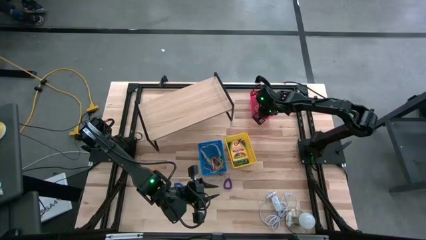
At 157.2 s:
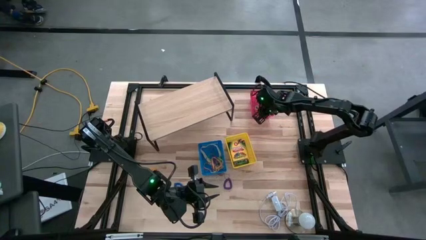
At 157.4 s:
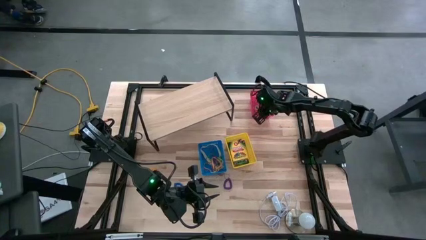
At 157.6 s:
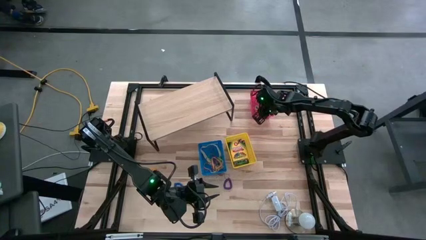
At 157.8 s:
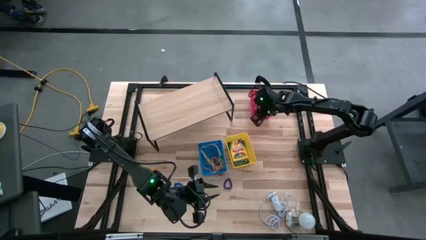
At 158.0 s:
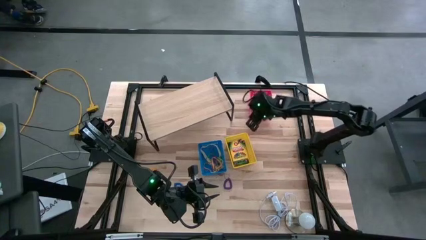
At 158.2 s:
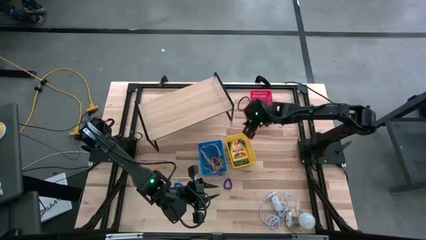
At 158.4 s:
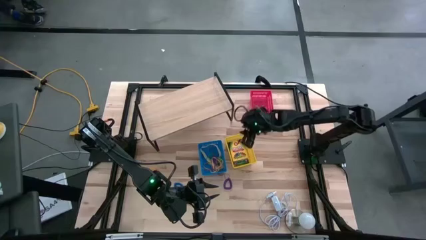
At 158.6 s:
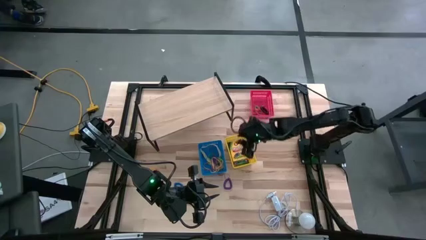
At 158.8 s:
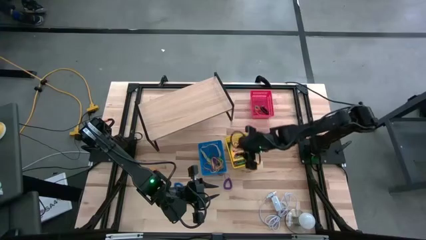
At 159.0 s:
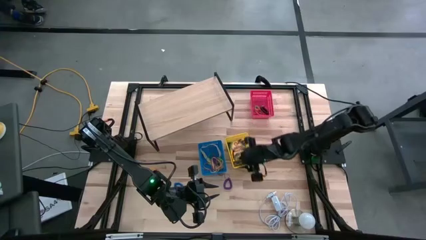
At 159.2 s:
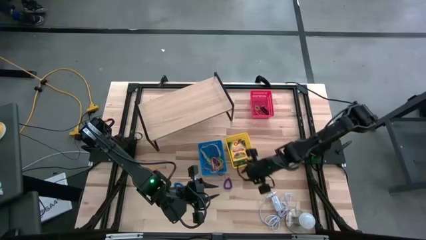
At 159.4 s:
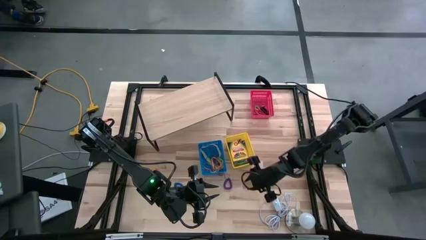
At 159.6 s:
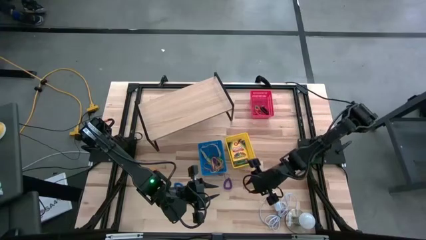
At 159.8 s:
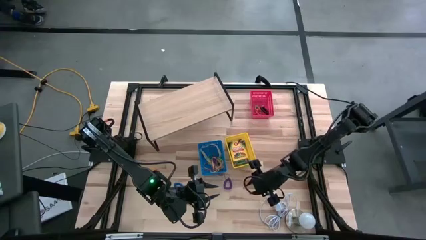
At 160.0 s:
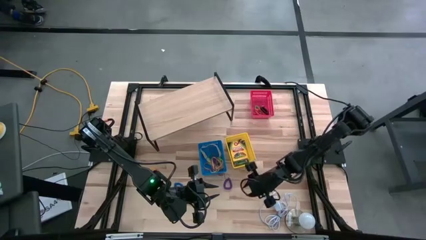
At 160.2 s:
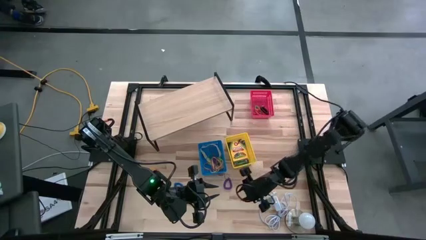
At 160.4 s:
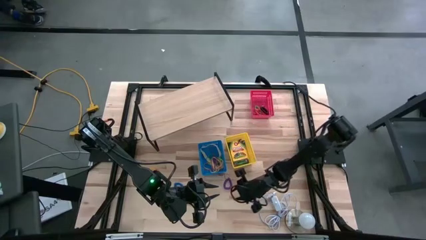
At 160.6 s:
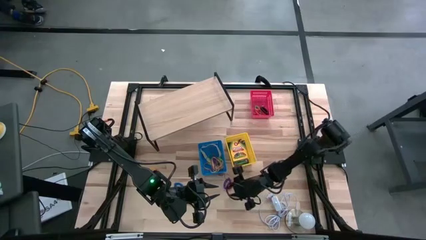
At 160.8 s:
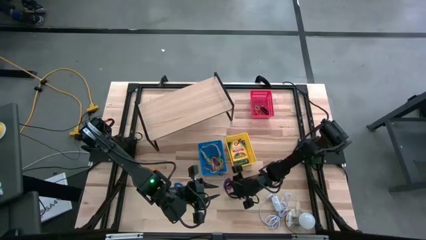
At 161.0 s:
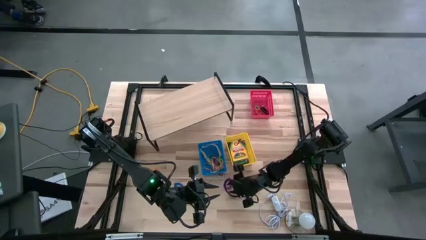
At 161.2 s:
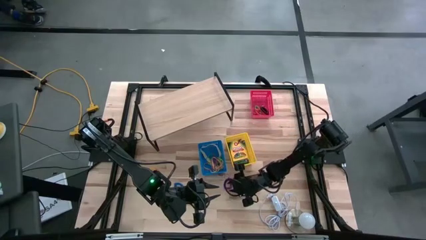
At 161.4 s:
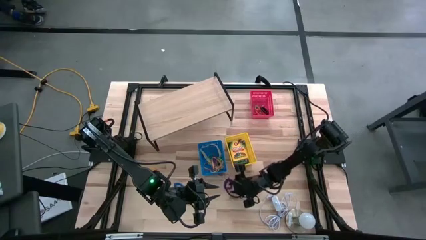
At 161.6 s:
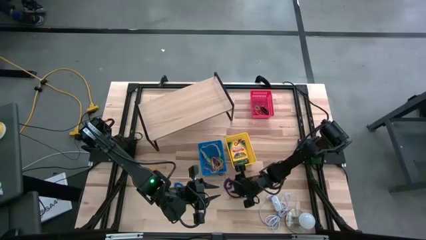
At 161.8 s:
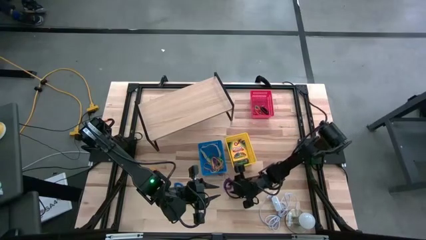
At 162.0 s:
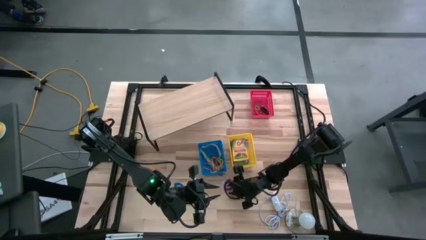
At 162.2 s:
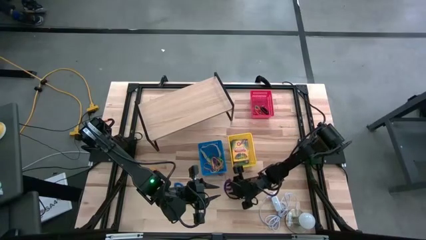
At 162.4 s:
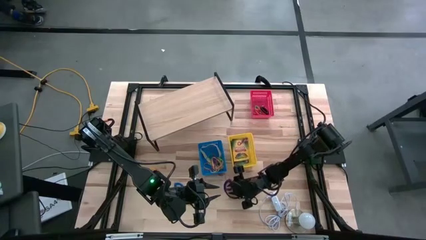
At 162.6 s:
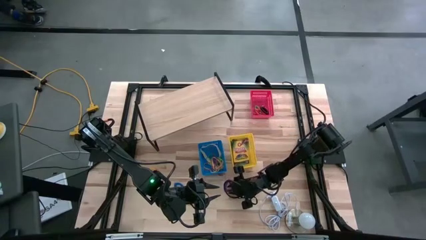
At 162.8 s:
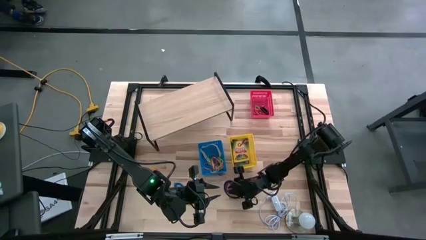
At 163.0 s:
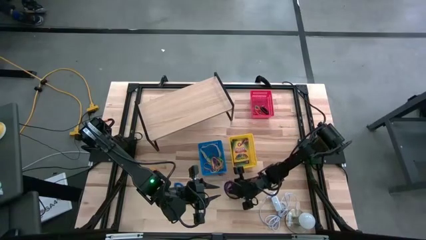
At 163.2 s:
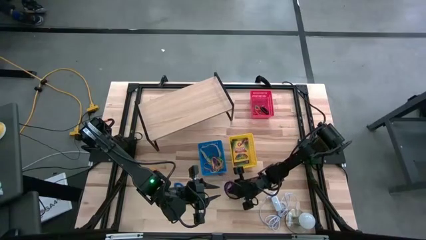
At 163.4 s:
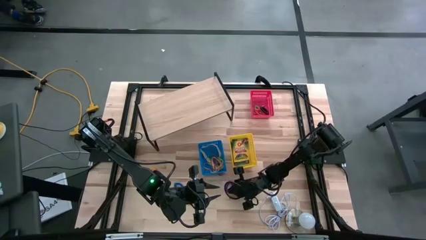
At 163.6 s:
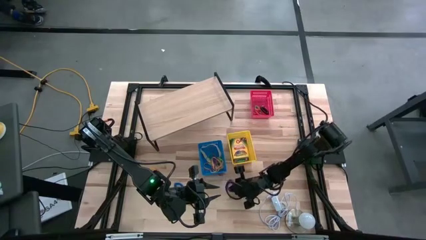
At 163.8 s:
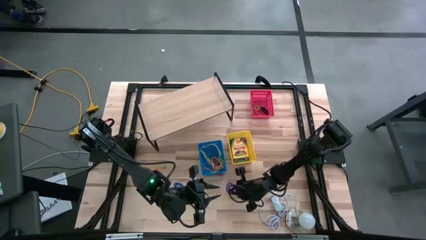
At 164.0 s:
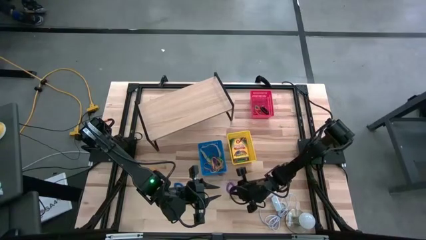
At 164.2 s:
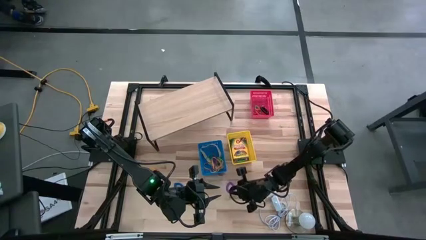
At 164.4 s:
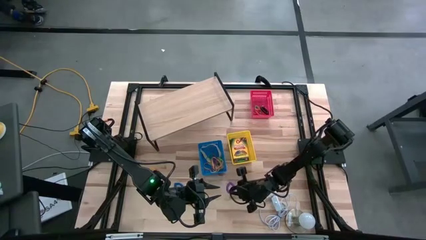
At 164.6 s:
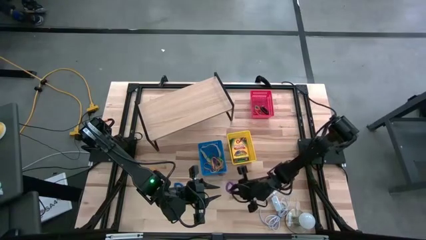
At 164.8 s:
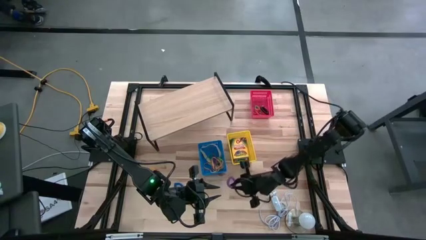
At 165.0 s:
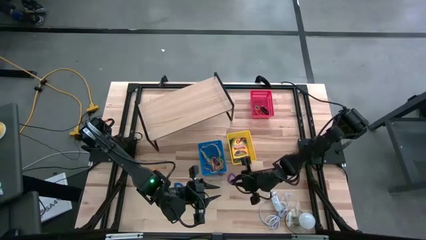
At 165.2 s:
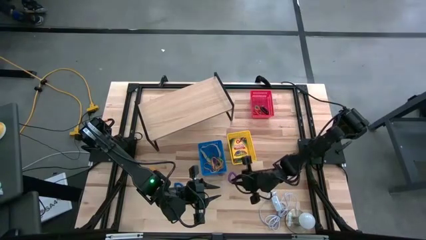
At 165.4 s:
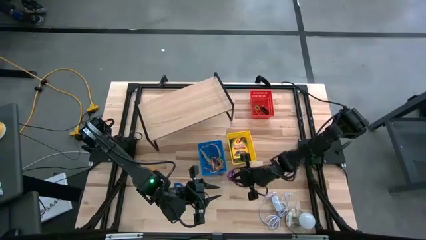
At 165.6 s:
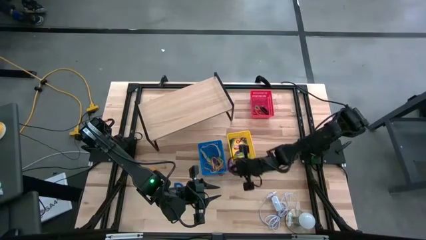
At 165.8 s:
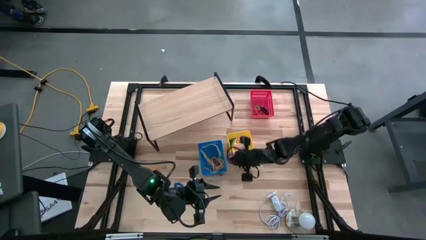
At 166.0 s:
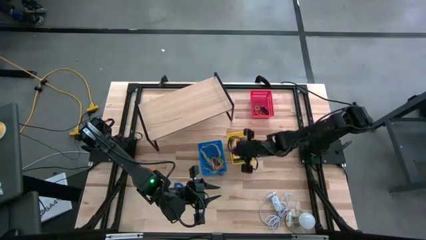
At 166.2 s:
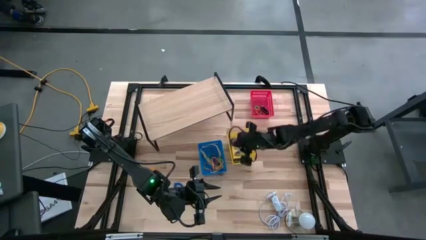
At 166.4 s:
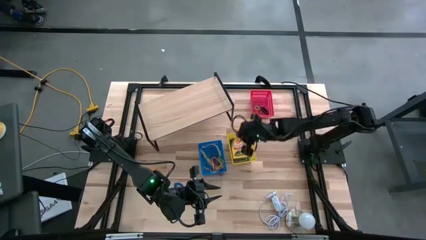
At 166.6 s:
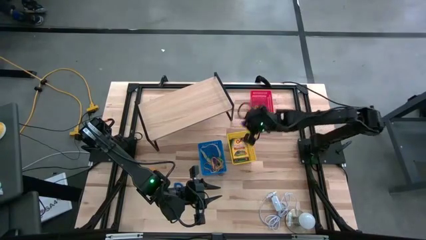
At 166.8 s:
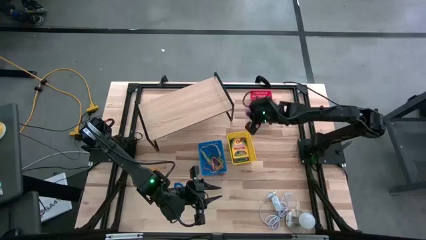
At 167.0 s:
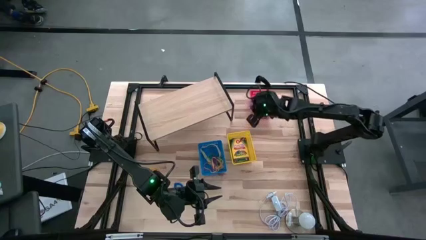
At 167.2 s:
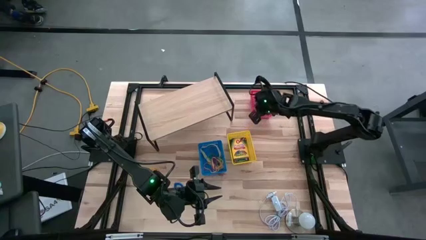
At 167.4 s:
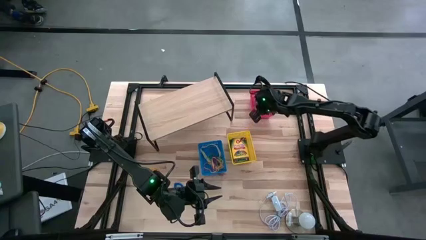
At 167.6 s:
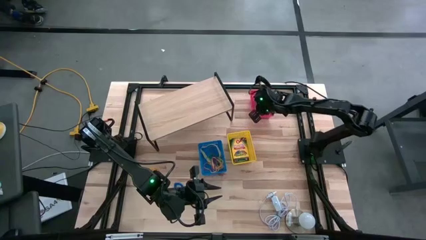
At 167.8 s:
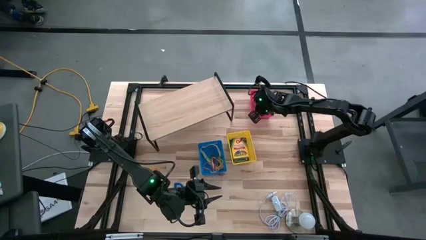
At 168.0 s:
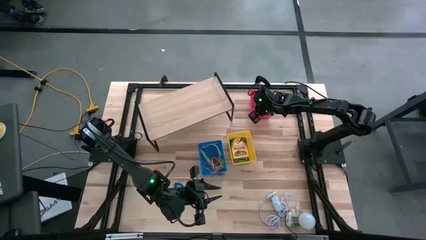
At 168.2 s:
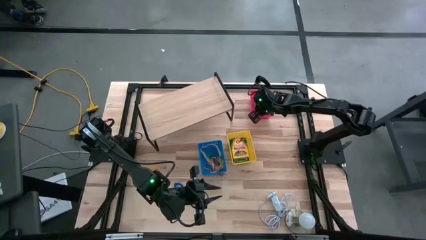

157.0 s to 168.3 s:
Task: Pick & Place Office Desk Supplies
Put the violet spring keychain into the red bin
